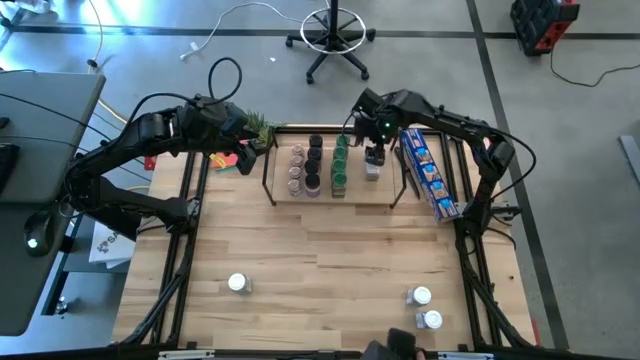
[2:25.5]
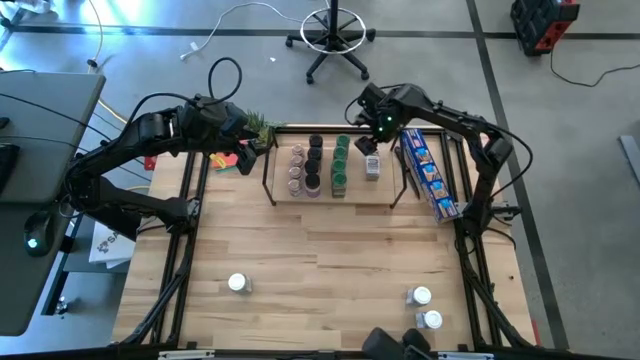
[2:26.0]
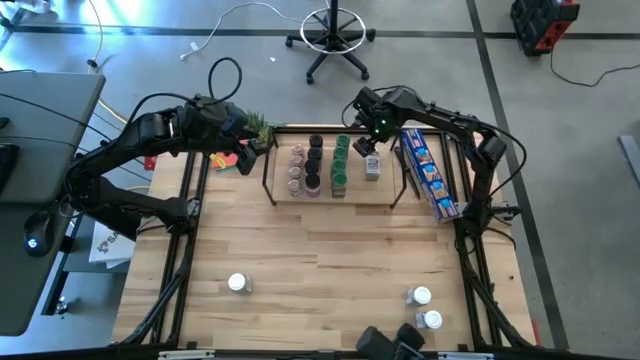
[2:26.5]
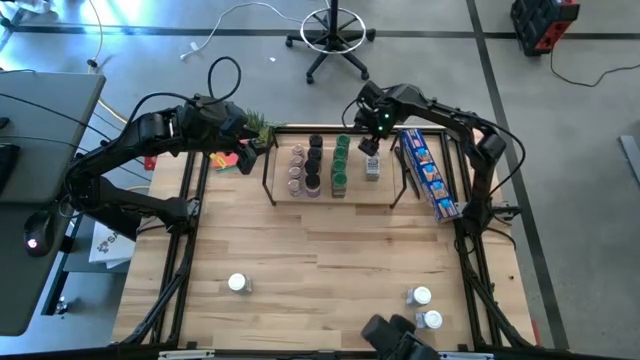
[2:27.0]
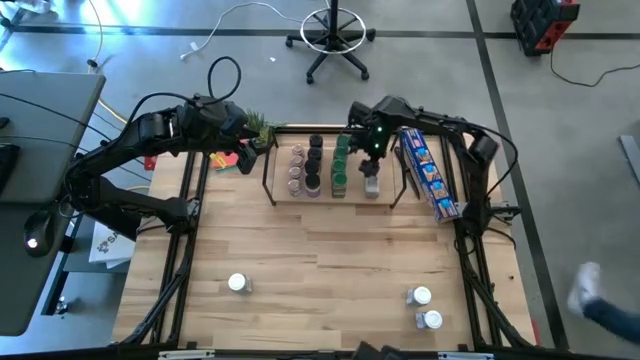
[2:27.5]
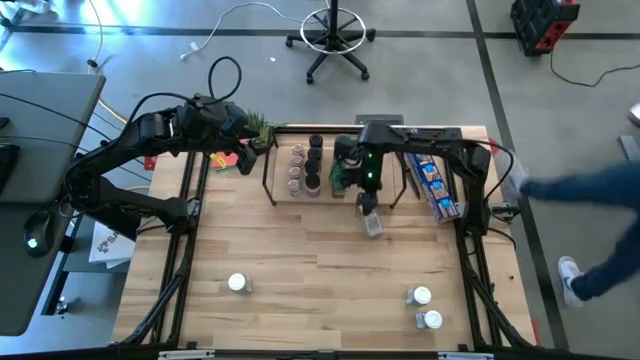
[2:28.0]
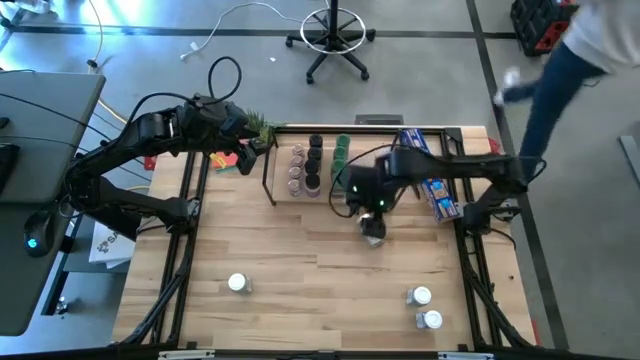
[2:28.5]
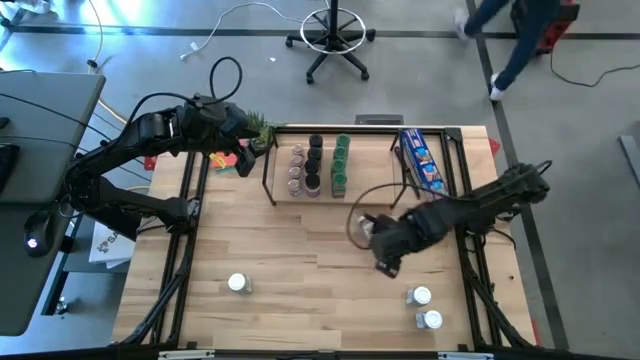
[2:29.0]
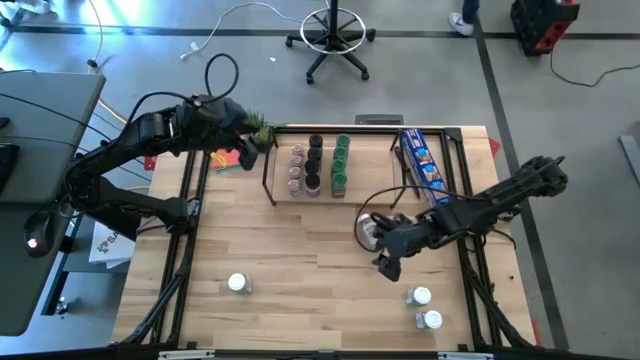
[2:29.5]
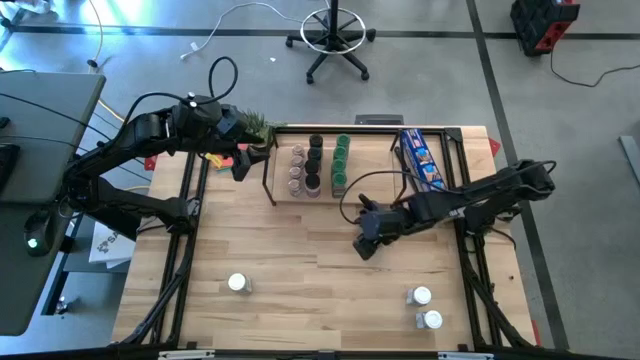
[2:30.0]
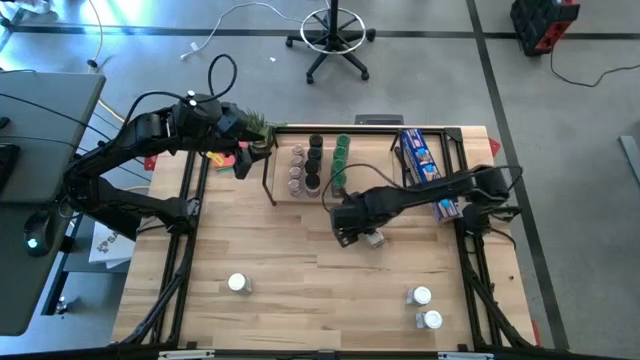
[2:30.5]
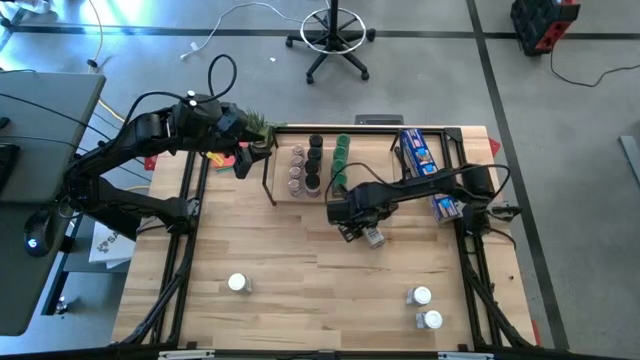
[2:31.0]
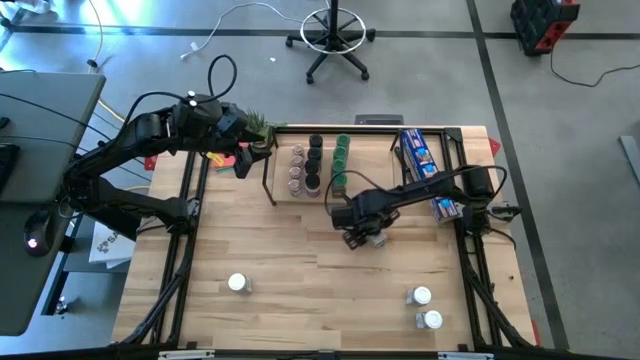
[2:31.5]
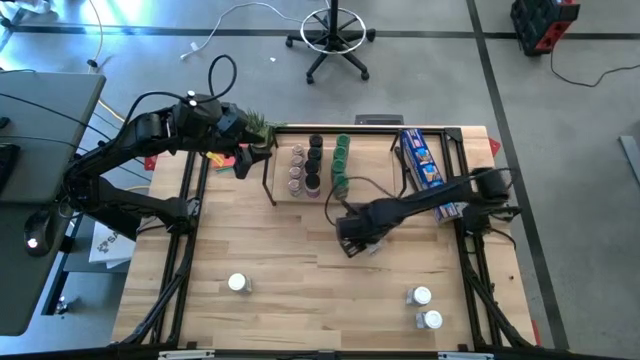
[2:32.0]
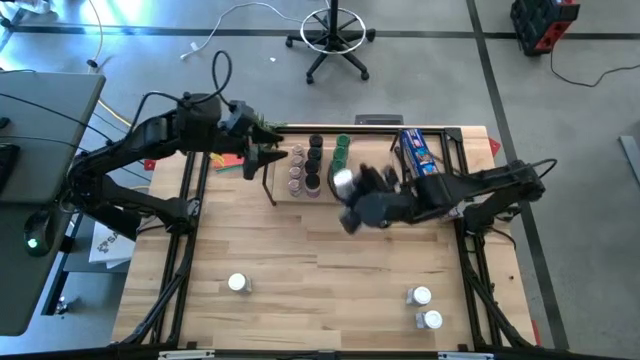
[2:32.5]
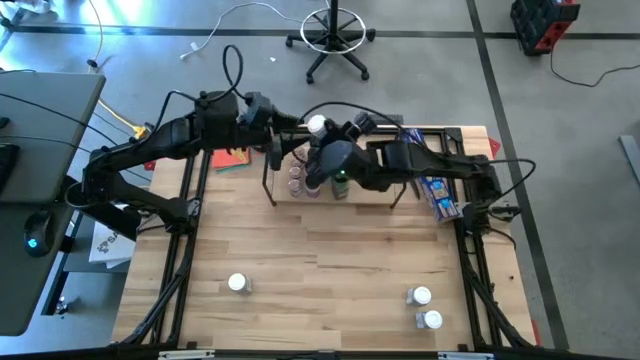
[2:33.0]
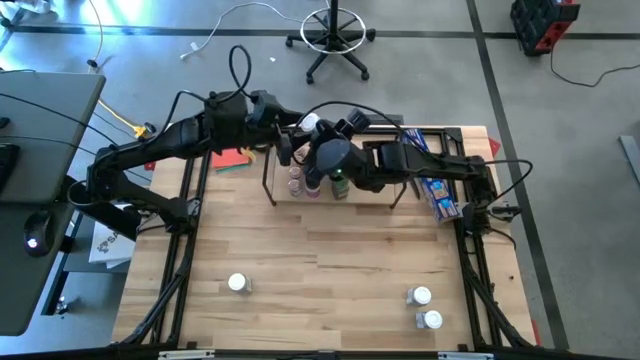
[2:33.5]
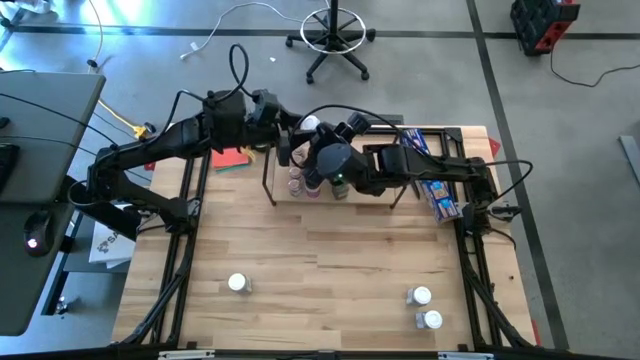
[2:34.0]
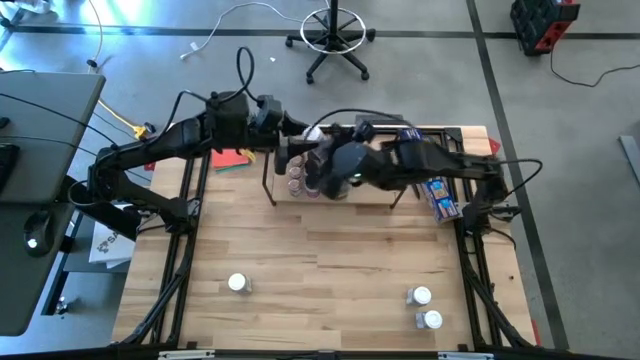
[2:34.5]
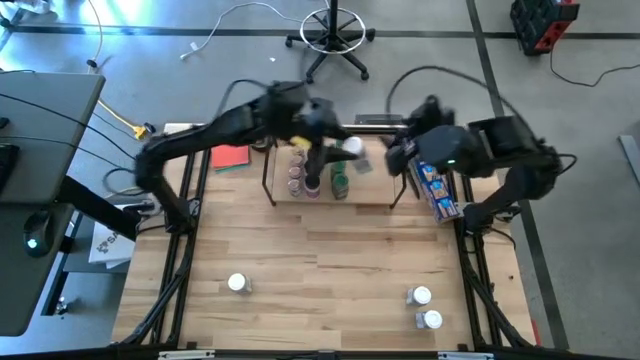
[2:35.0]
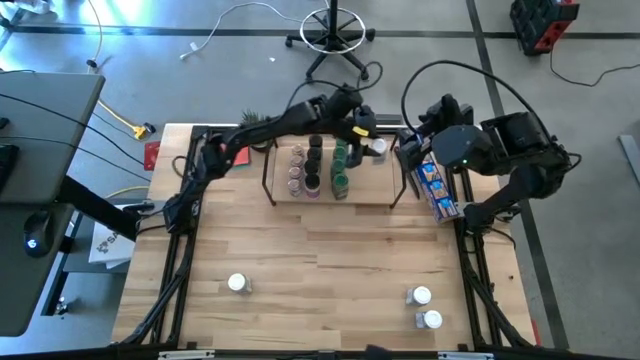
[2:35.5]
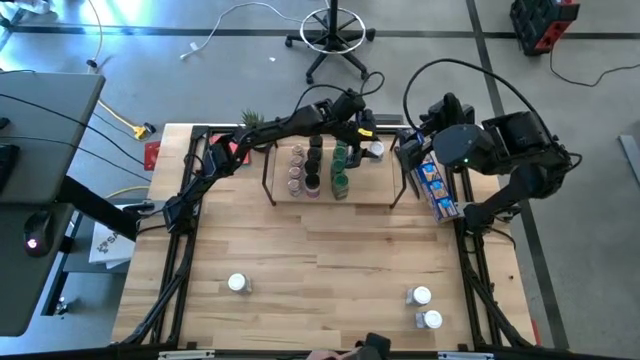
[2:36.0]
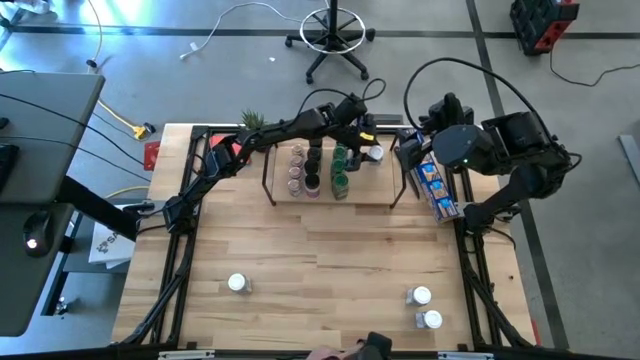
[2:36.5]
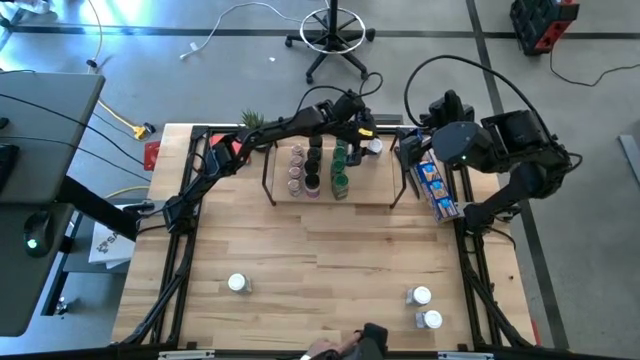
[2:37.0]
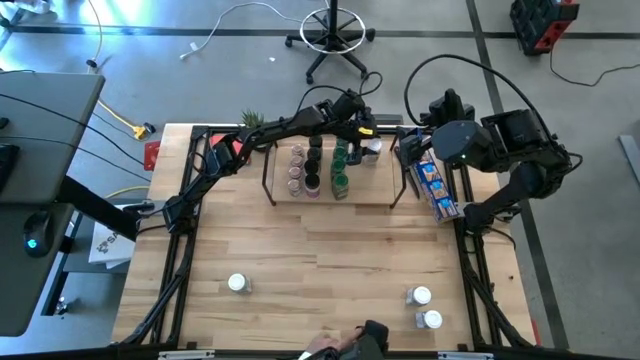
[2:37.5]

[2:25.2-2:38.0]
Task: Shelf spices
Put the white seasoning bottle on the shelf

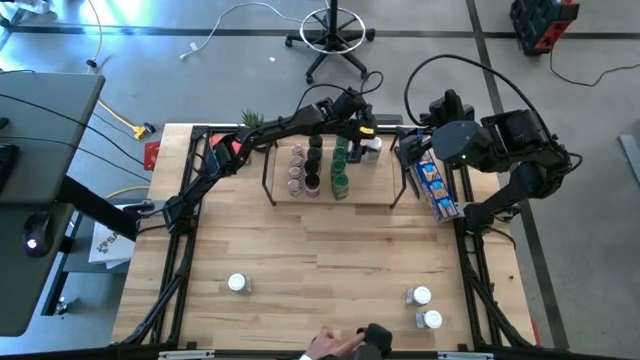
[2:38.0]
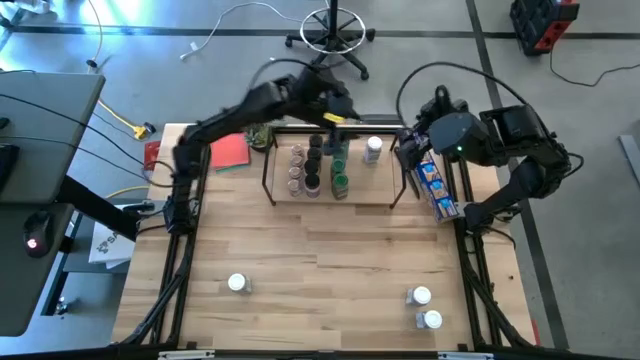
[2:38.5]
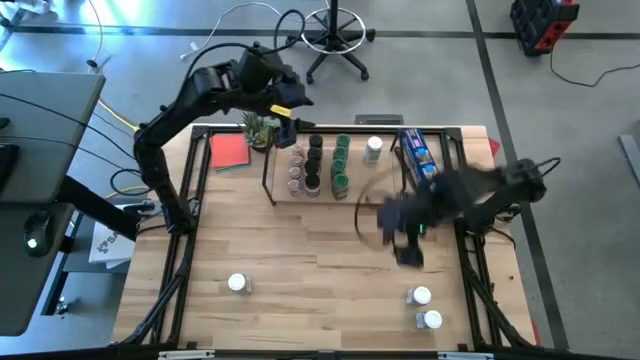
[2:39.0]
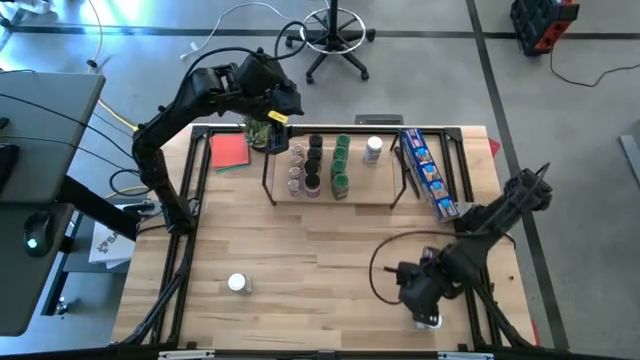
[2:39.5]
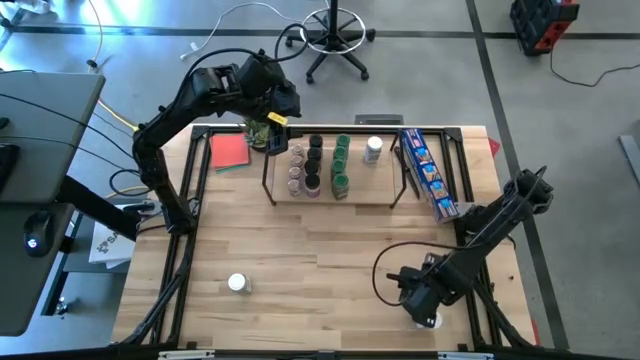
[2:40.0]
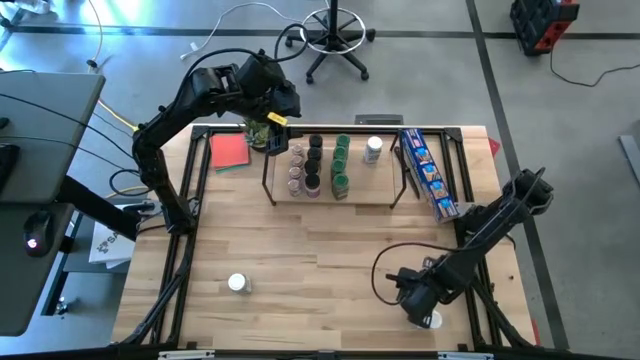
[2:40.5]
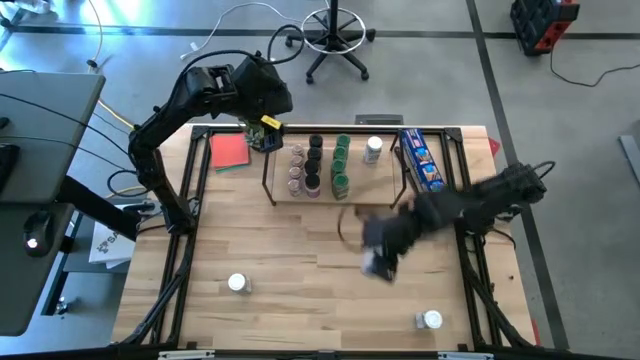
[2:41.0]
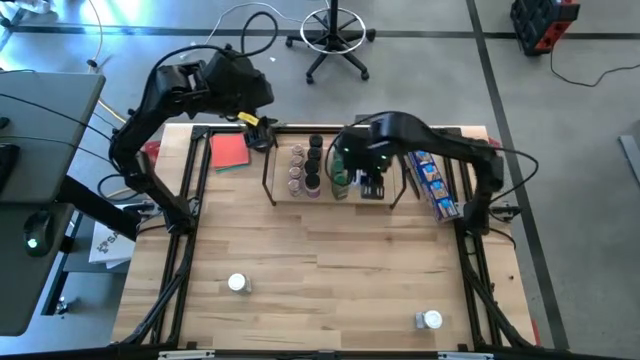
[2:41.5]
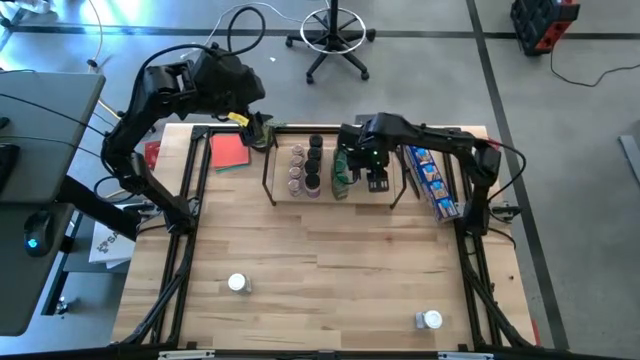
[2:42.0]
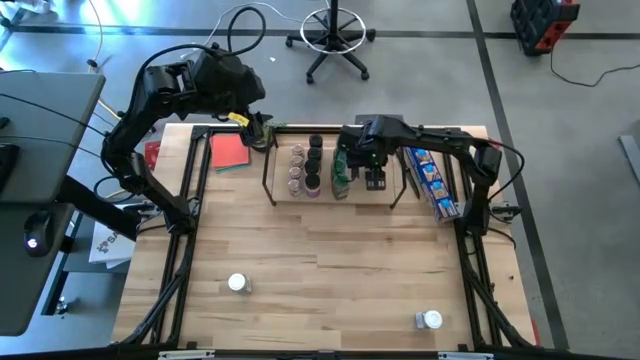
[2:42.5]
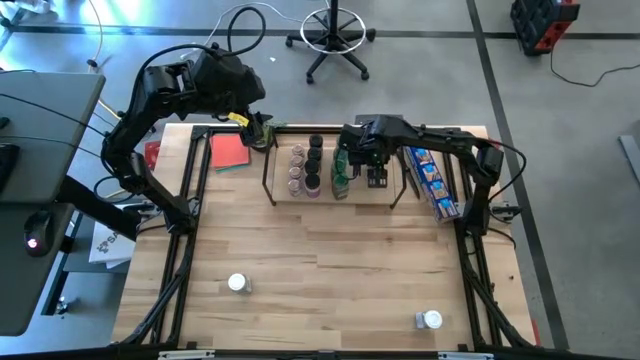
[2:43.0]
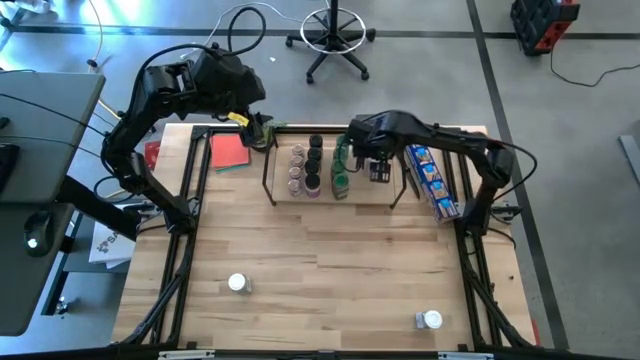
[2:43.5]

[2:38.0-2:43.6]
Put the white seasoning bottle aligned with the other green seasoning bottle on the shelf

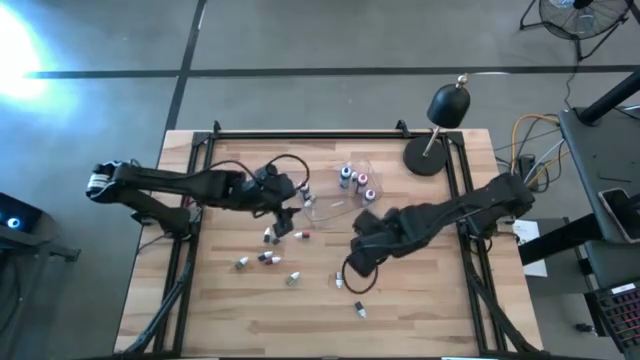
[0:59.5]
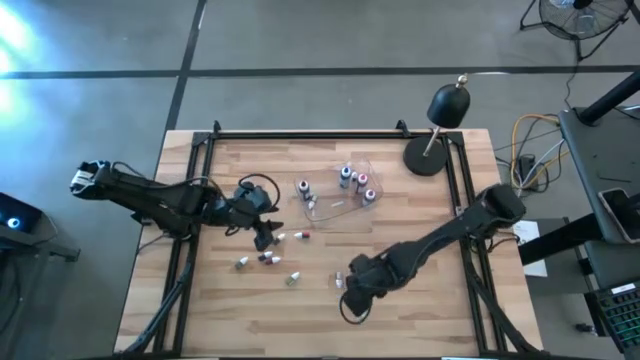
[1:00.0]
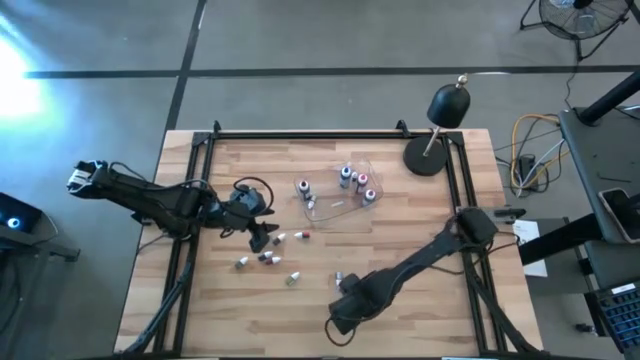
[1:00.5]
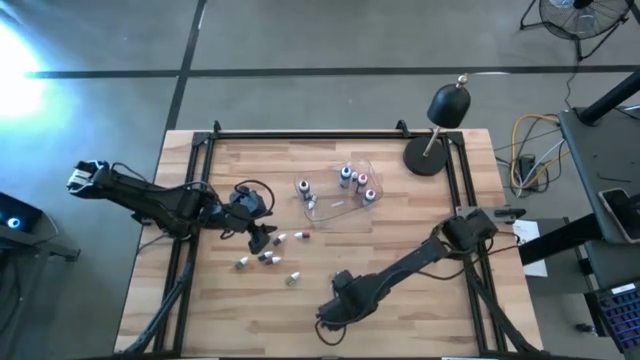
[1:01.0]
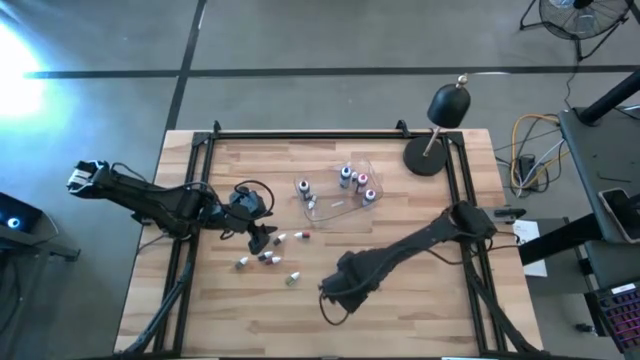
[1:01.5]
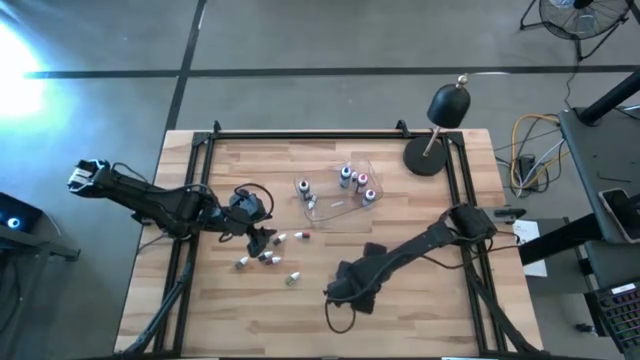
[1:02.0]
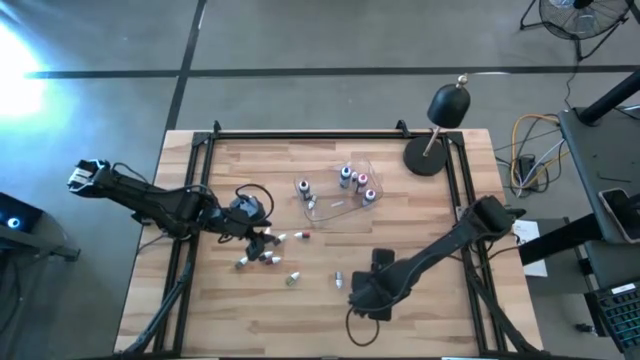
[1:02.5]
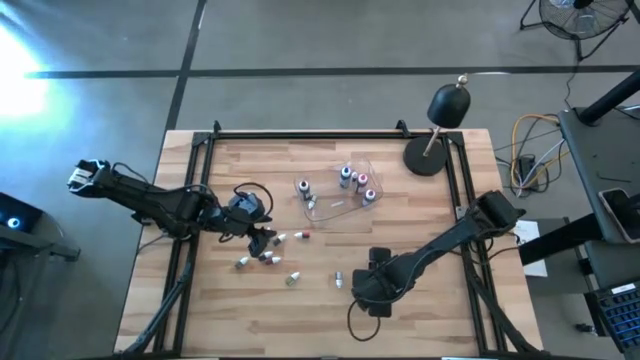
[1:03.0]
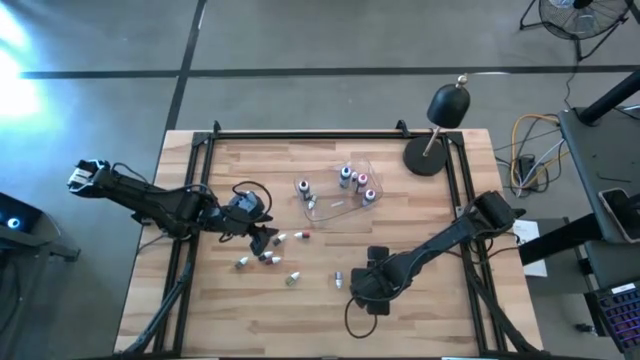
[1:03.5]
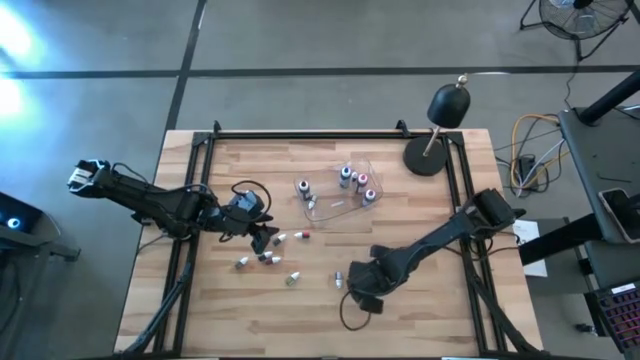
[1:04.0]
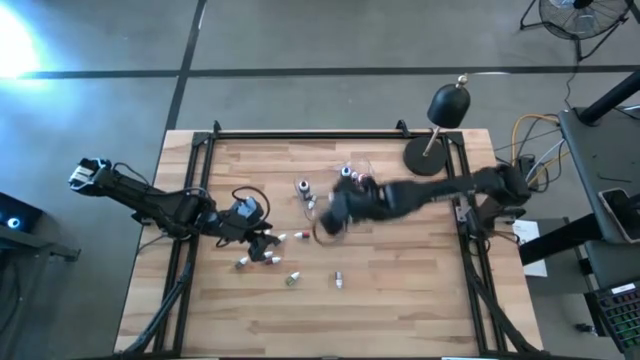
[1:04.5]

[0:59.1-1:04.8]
Task: Pick & Place food coloring
Put the small black food coloring bottle into the transparent bin
